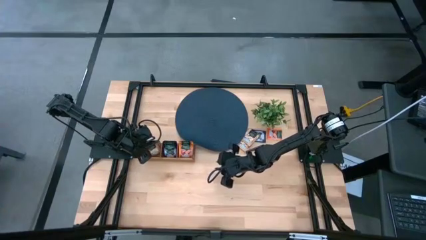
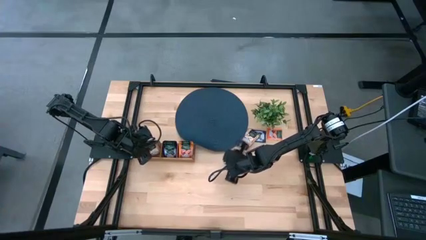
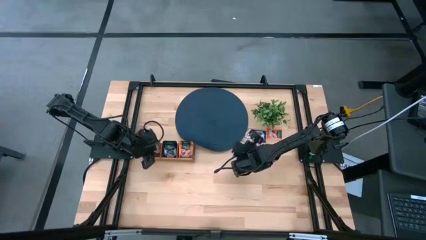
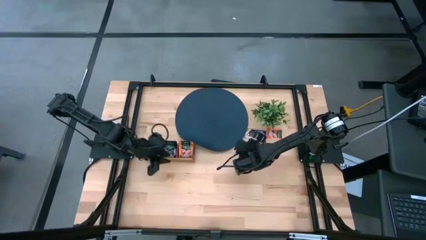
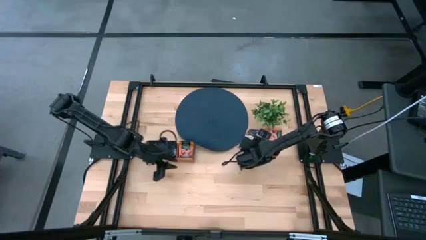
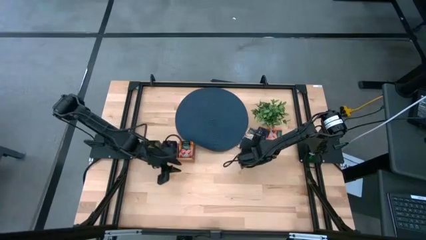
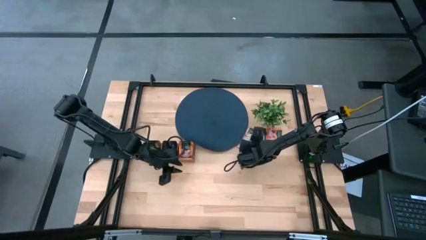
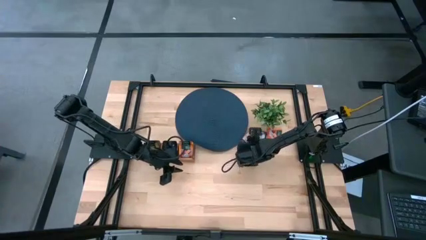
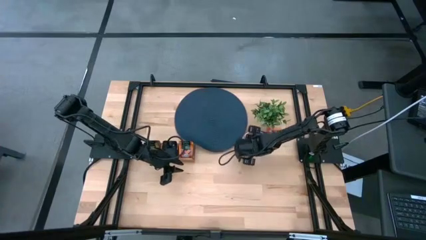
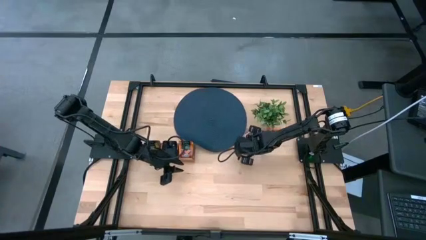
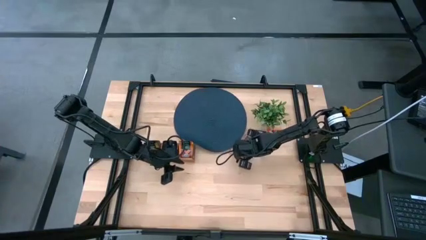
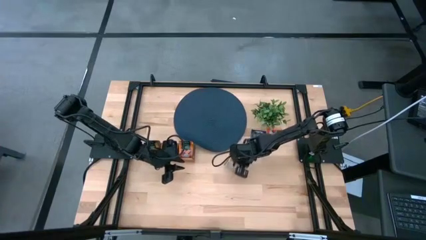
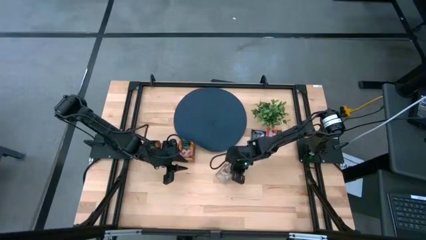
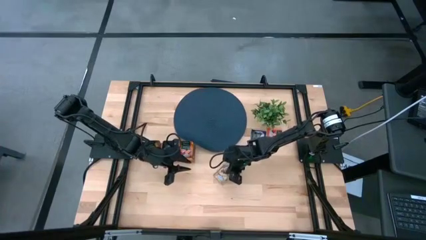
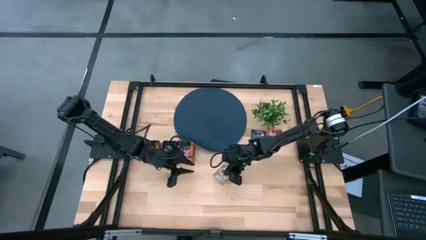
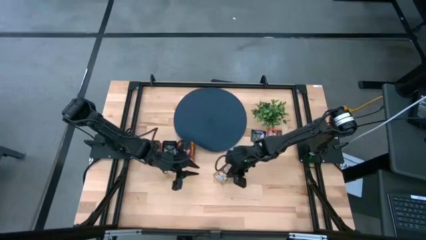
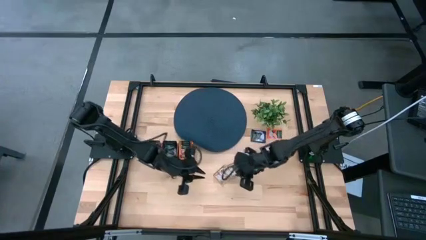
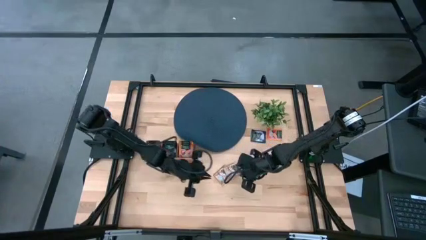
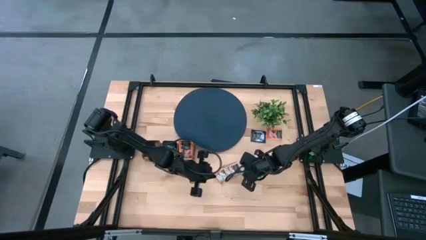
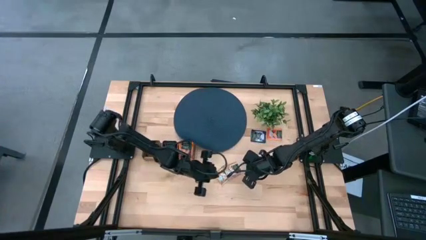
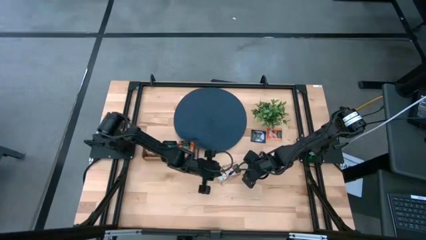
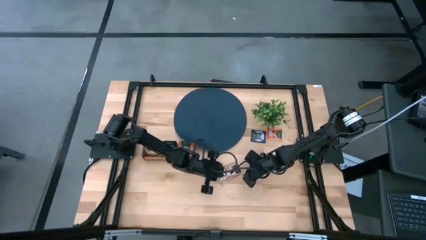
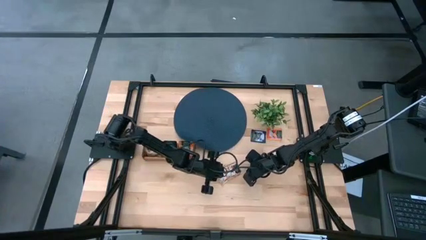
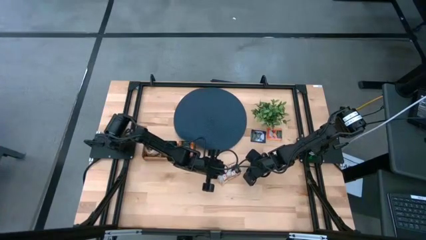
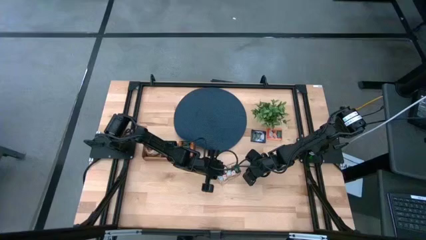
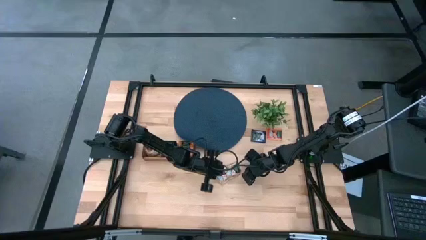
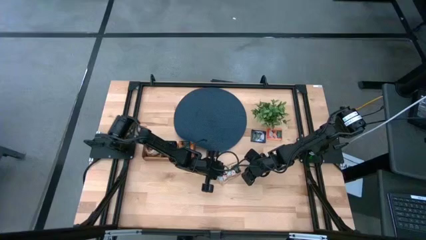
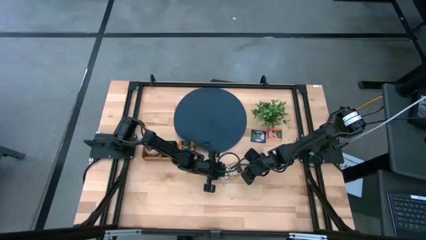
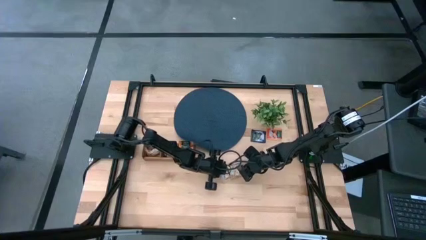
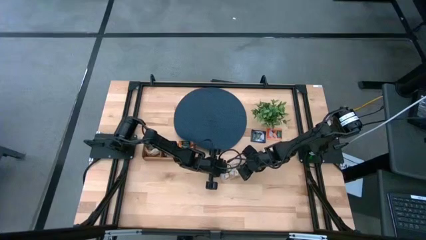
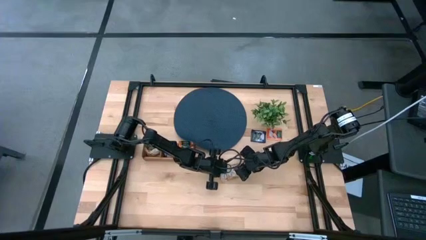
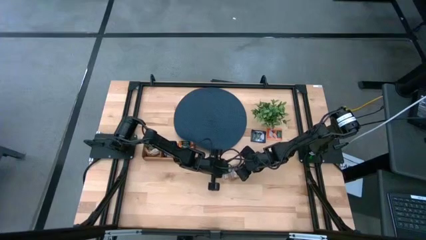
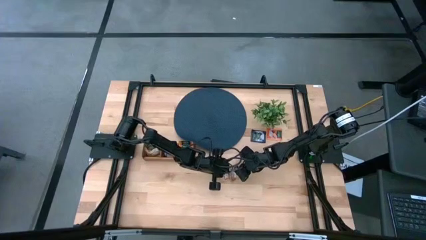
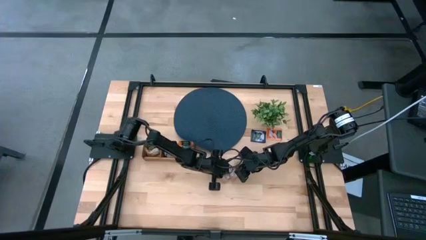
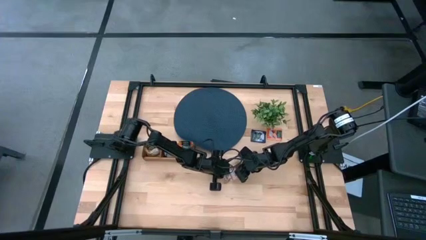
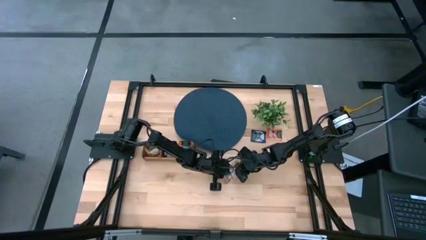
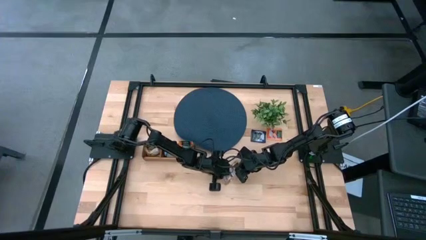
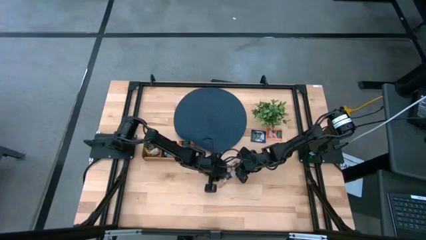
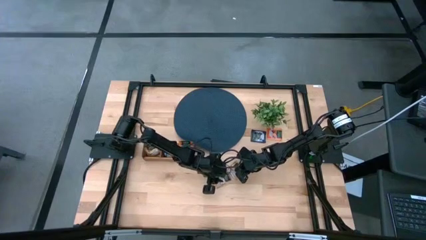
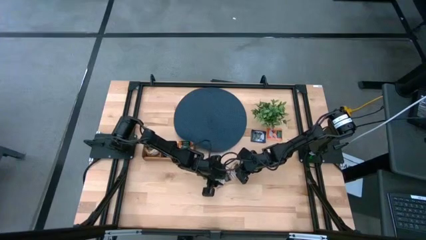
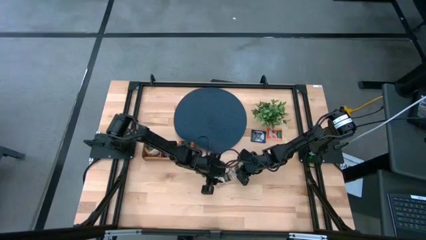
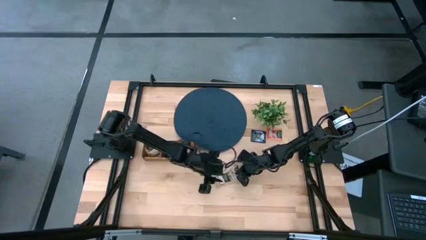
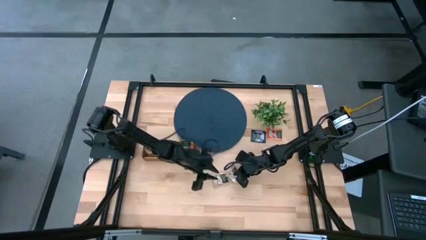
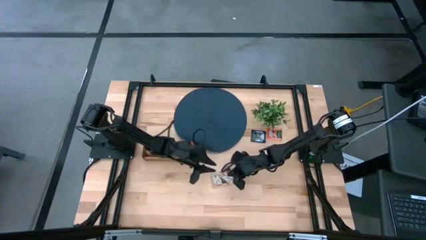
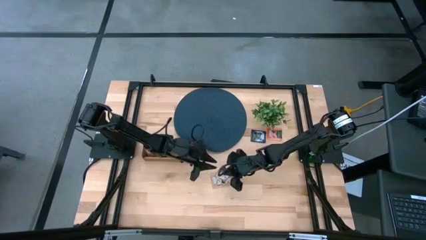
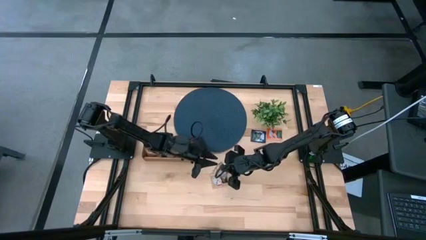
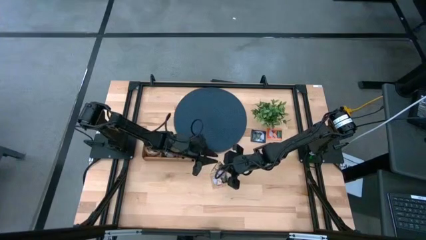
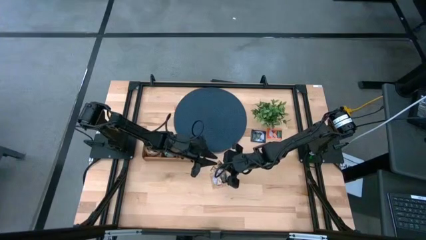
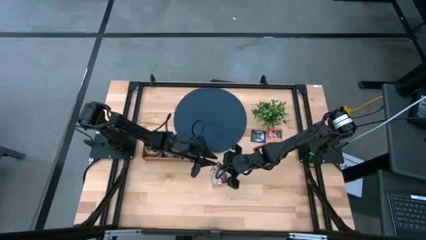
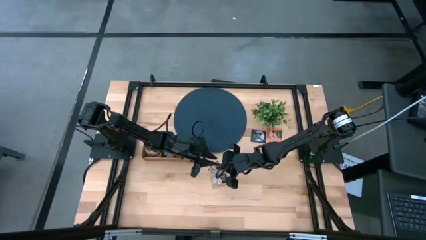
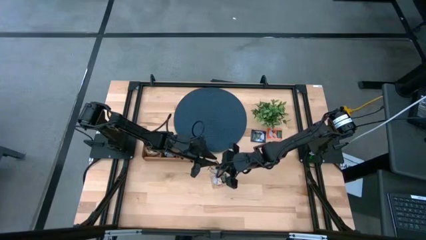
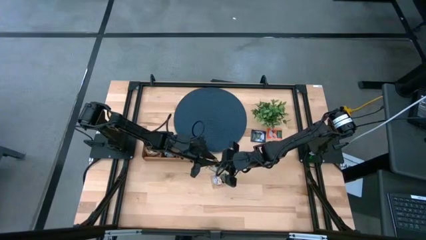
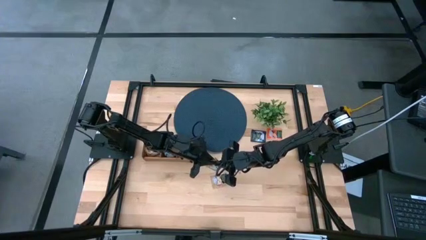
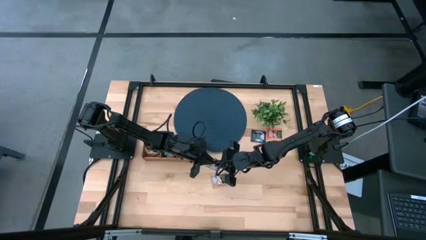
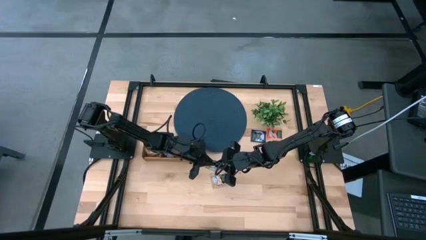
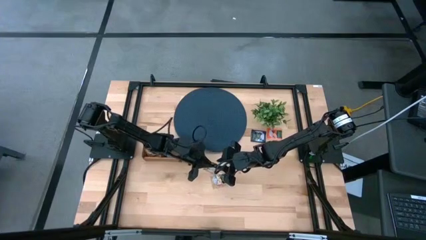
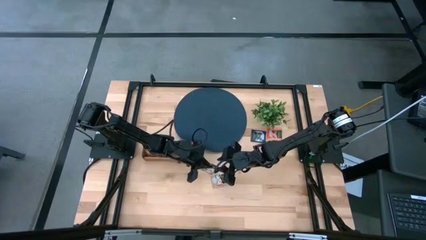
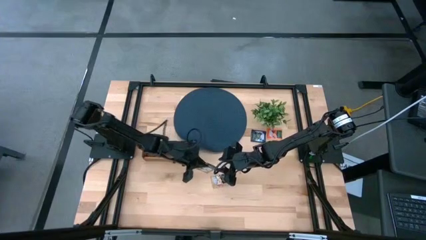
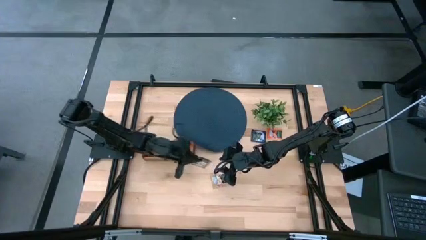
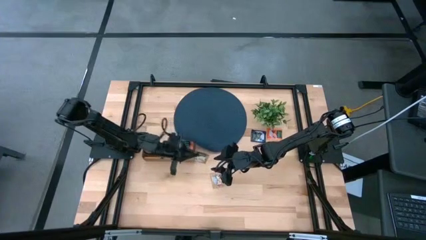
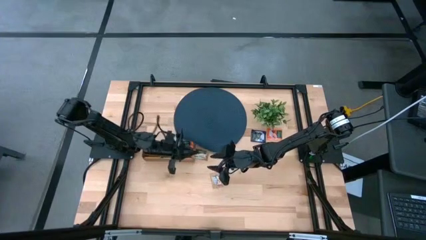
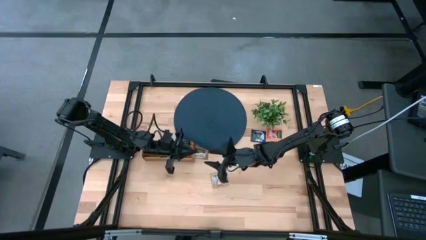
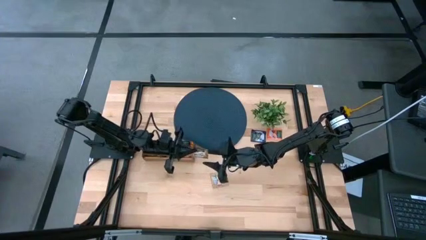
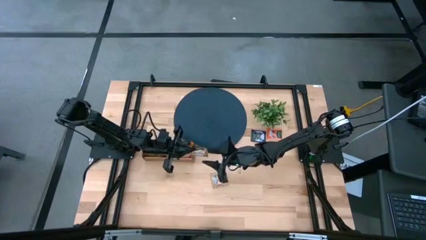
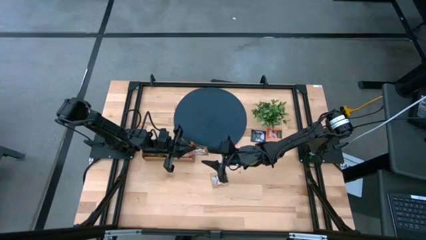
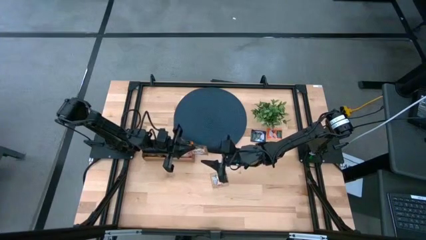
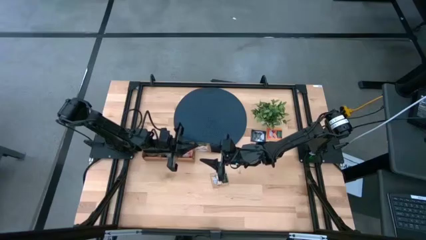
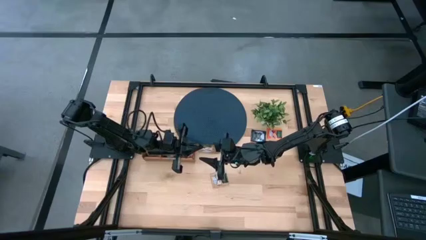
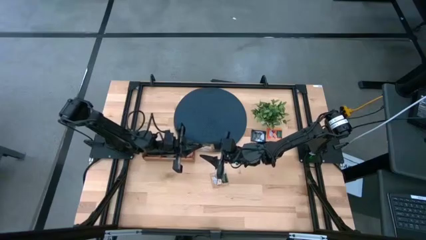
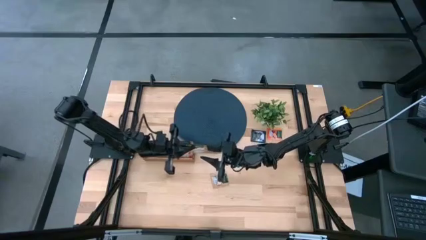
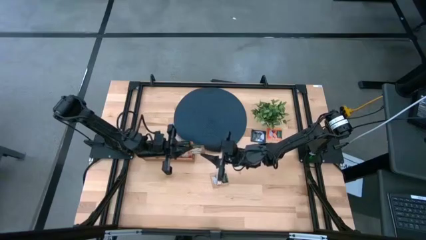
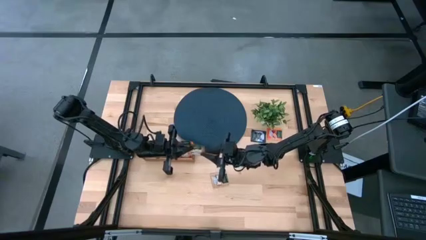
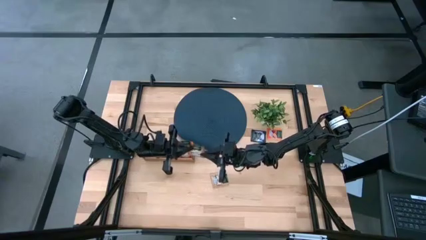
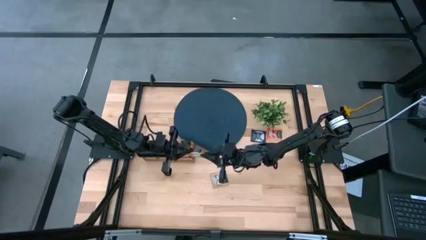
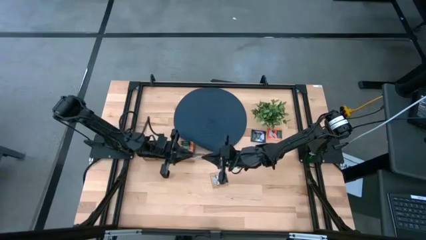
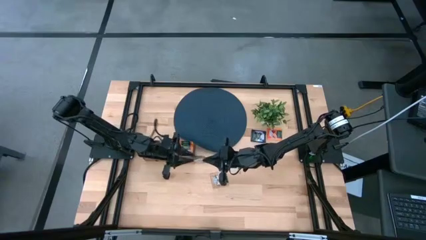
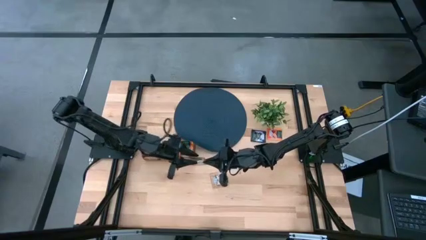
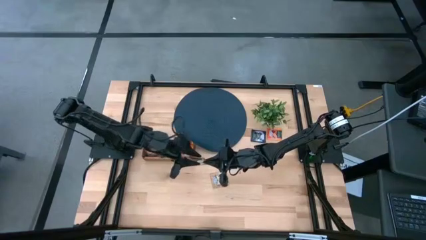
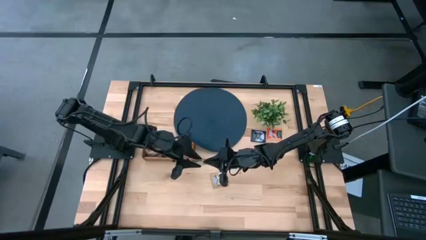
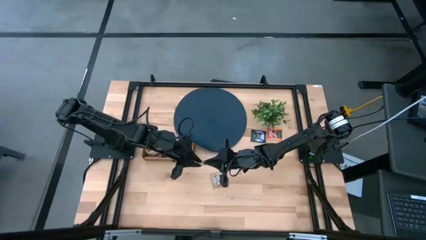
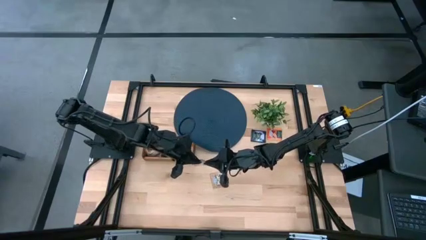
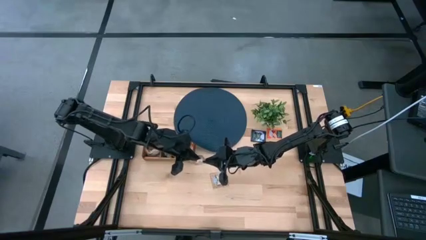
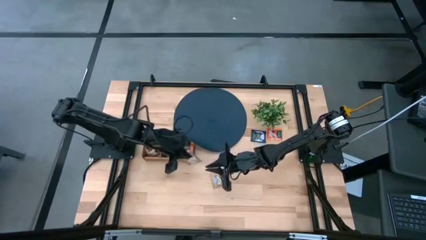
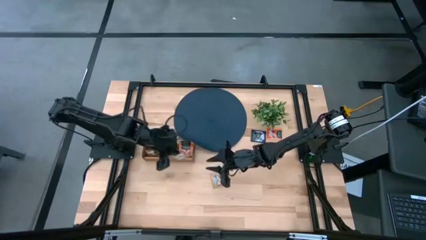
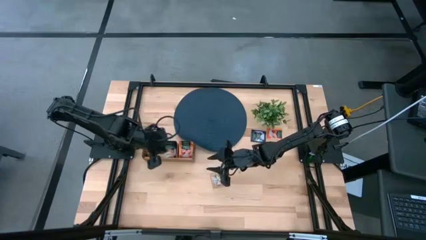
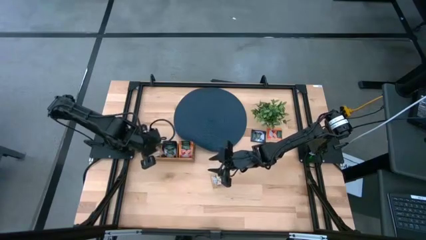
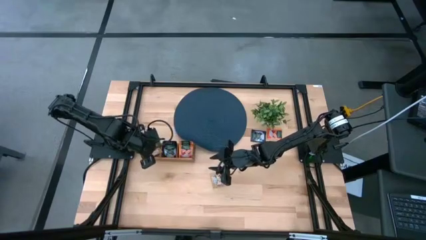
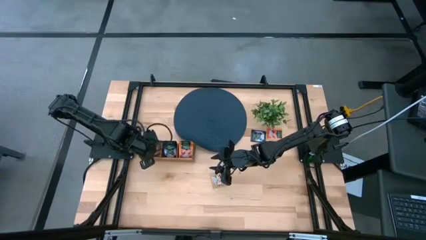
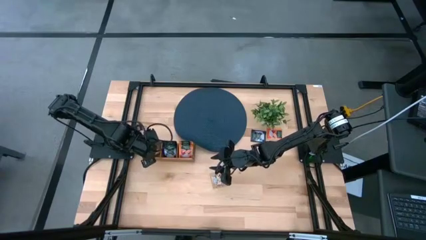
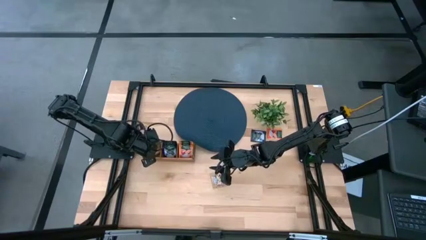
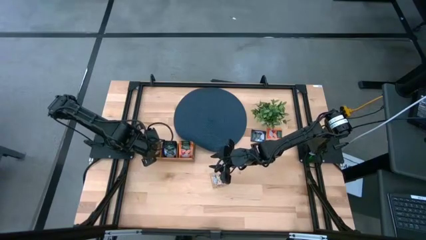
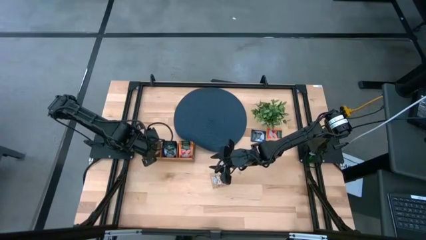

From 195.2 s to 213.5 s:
Task: Pick & Place Tea
Put the brown tea bag into the left section of the wooden organizer
